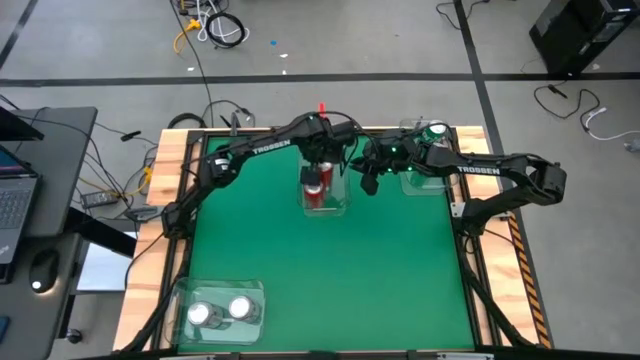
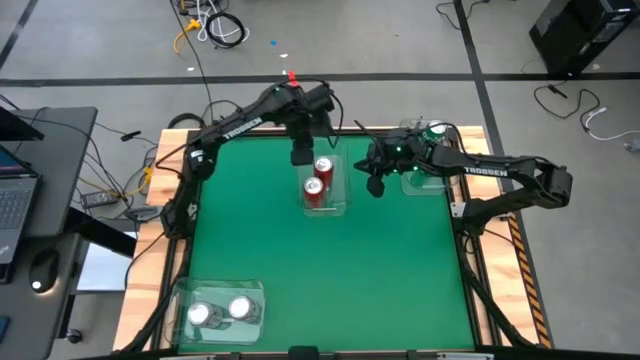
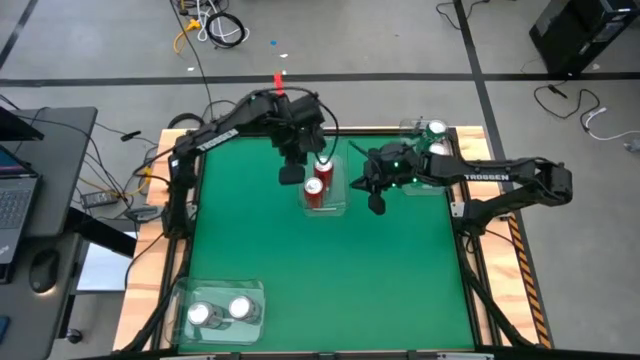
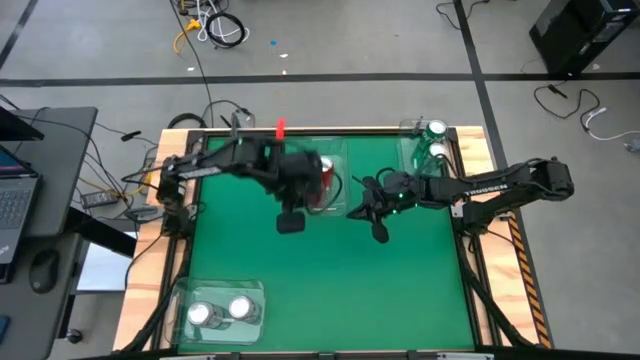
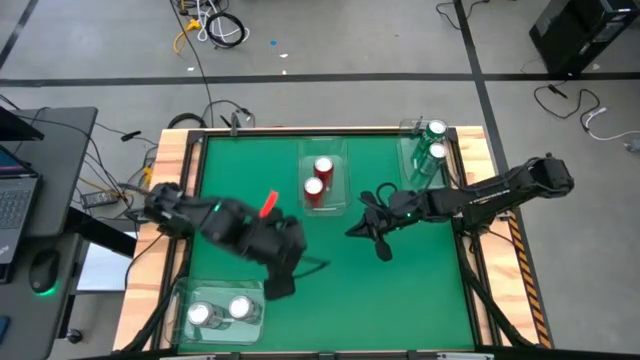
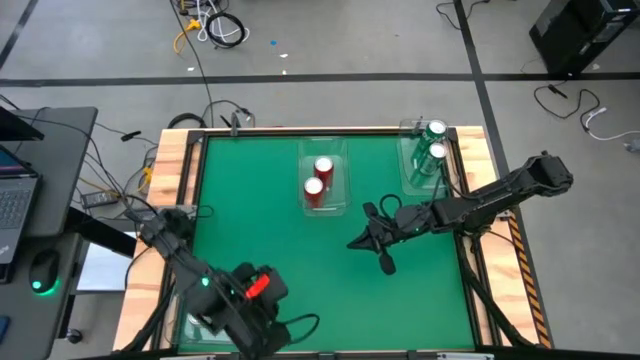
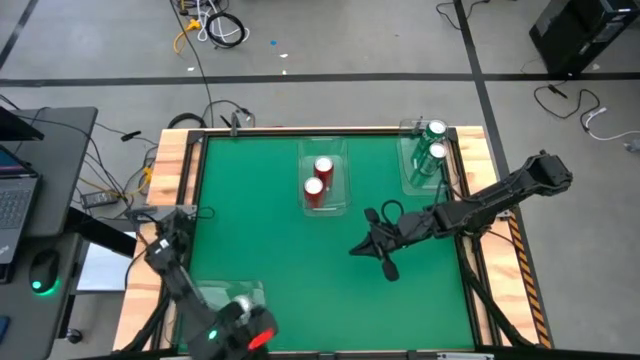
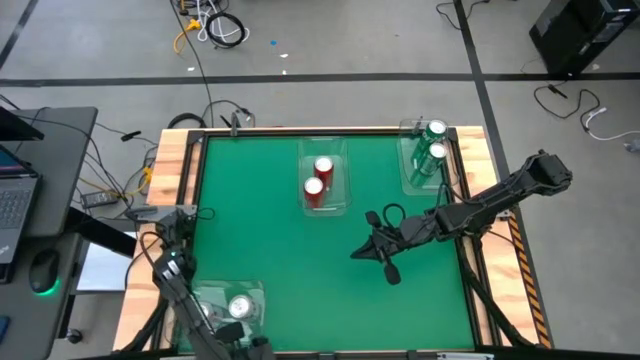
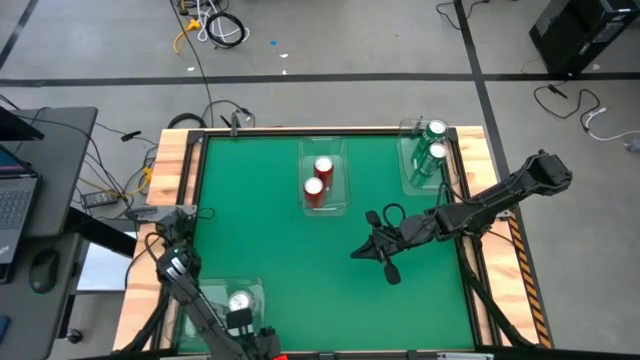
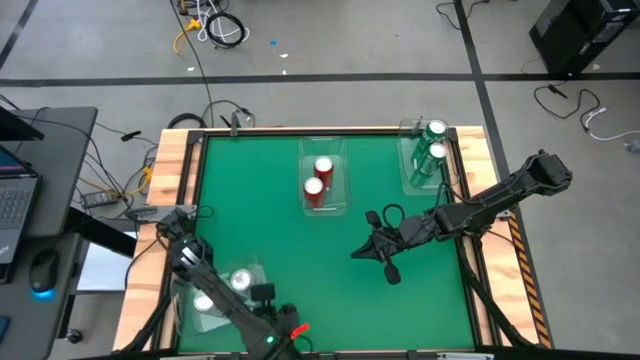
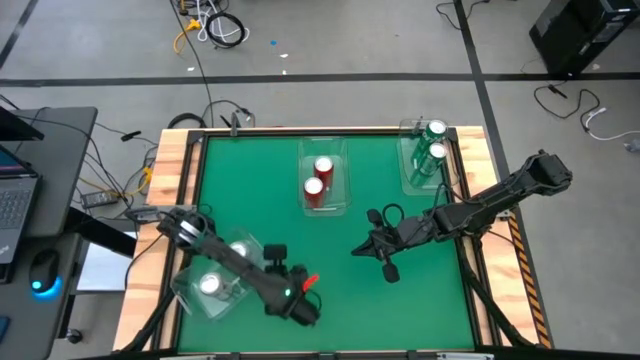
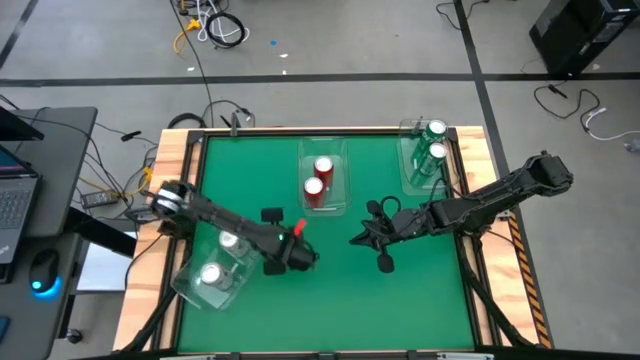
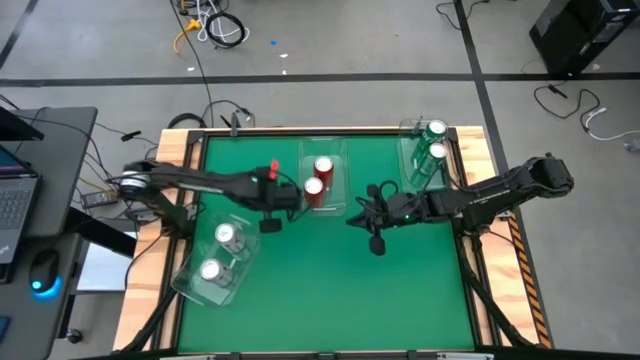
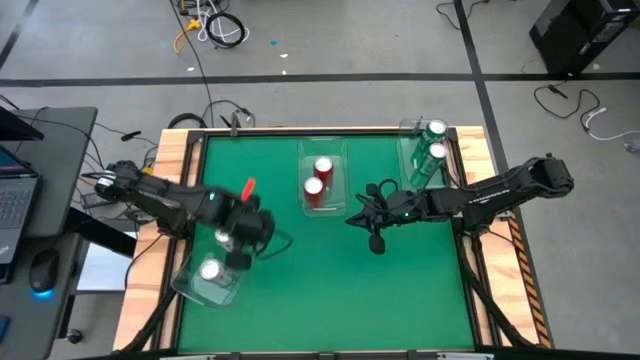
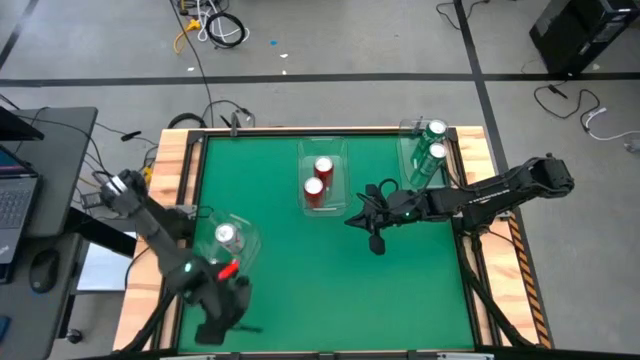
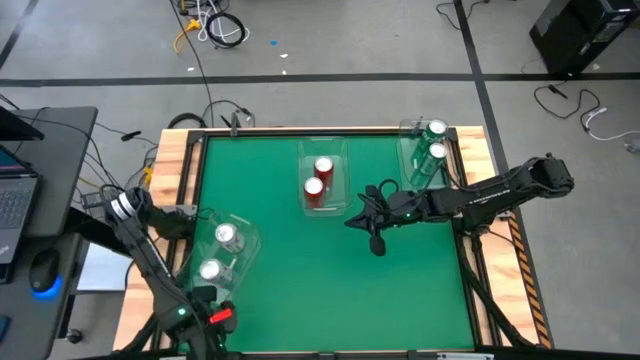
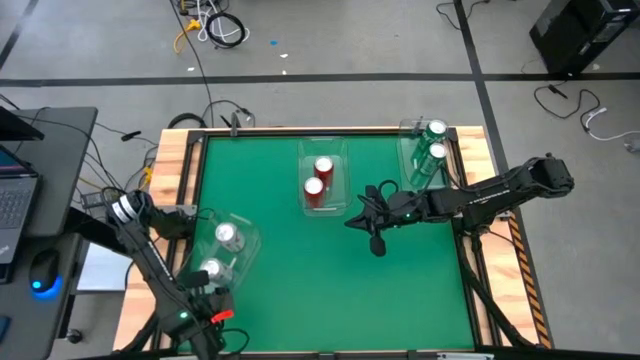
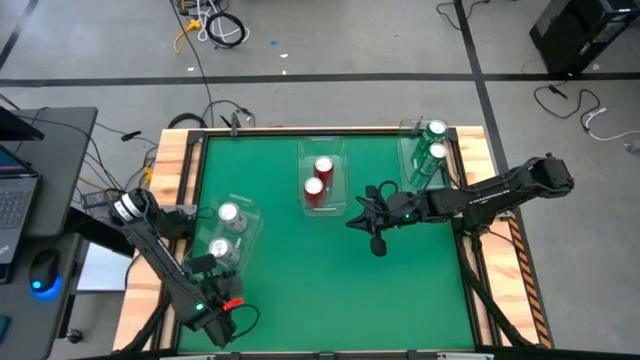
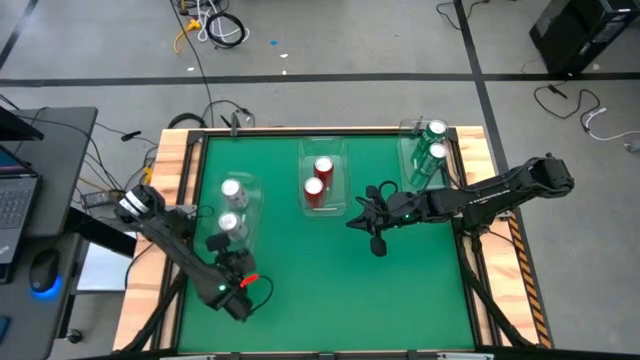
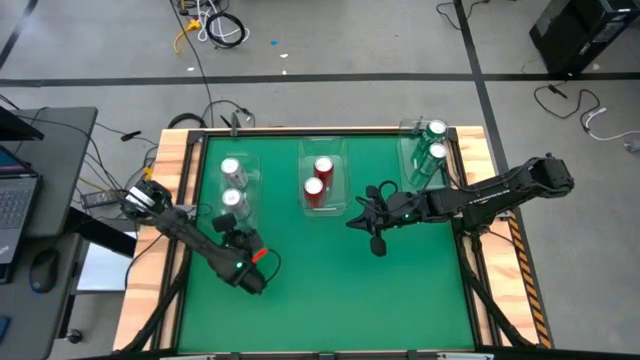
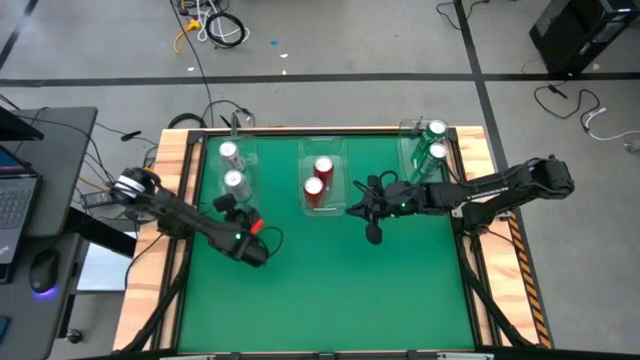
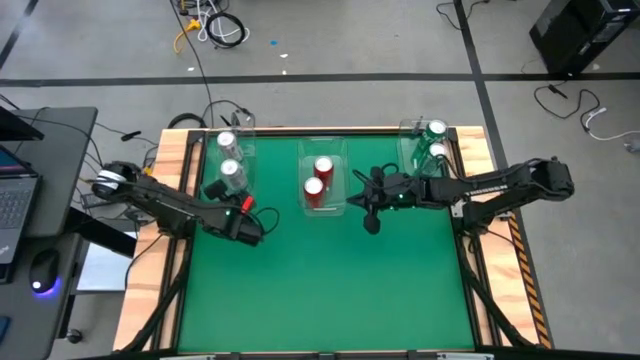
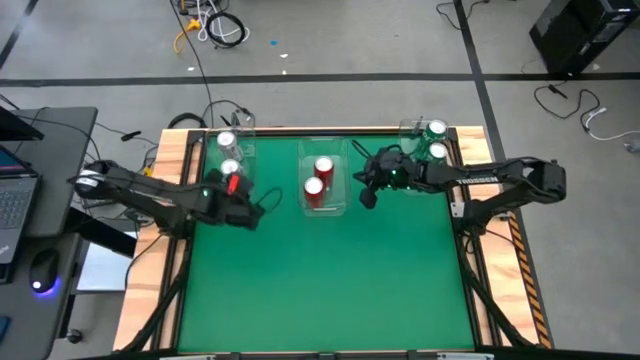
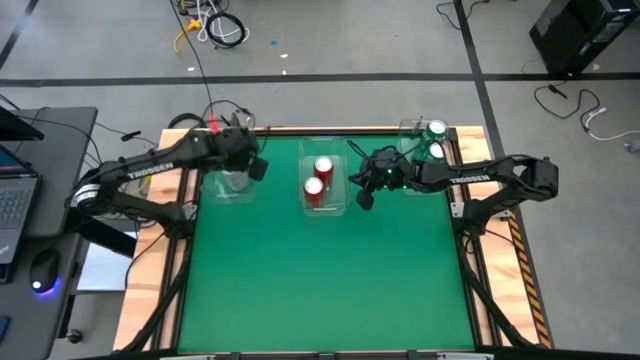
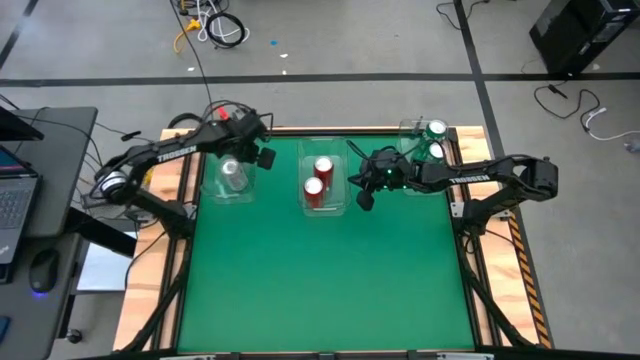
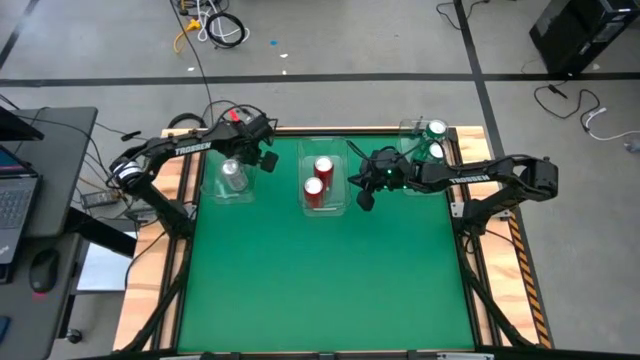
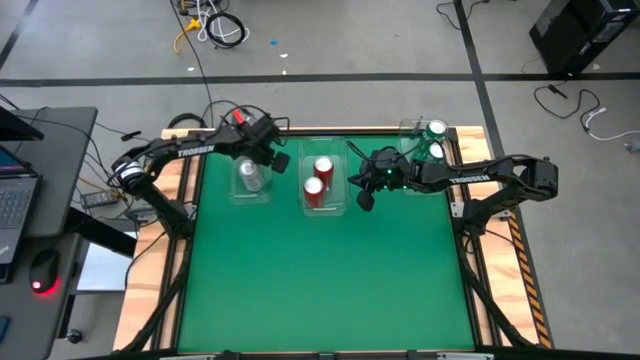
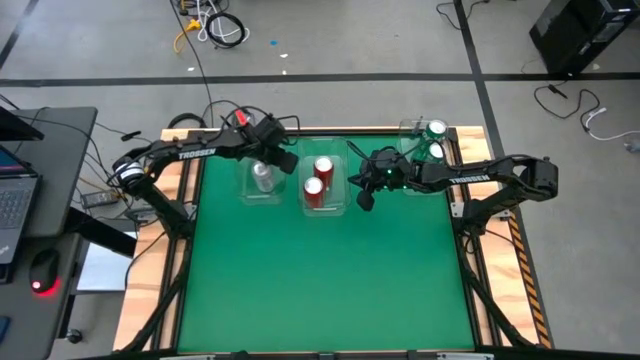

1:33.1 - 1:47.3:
Task: Sort soda cans
Move the bottom left transparent bin to the top left of the table

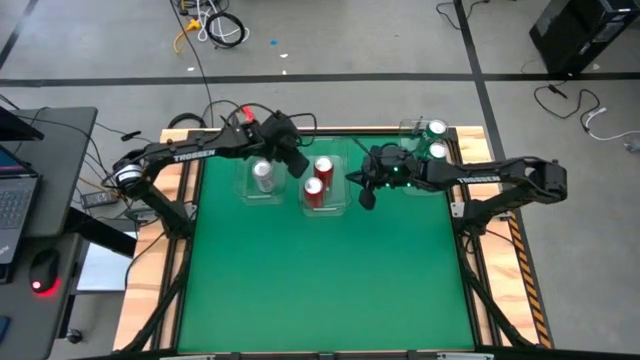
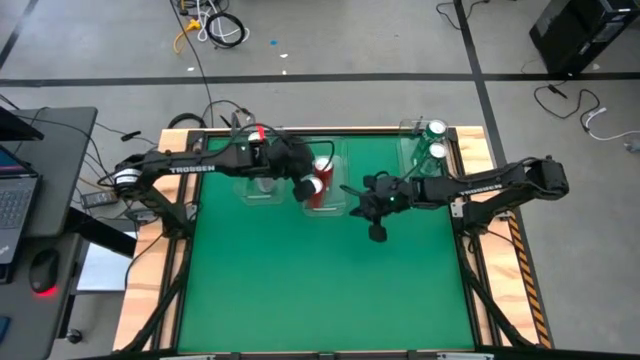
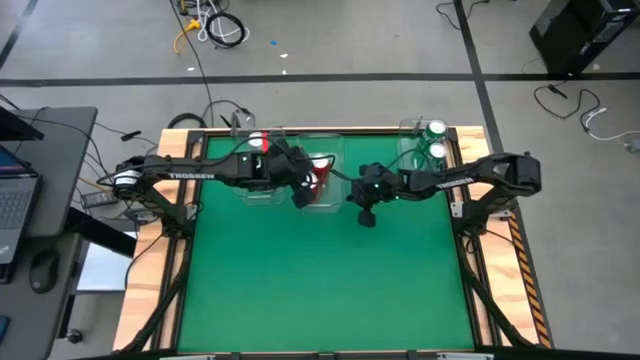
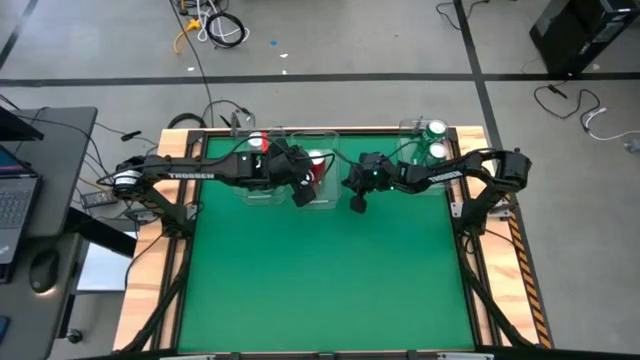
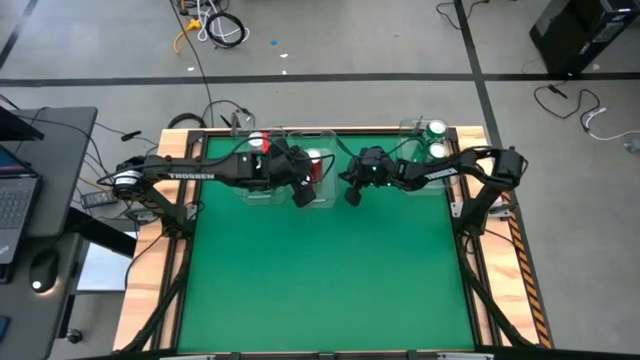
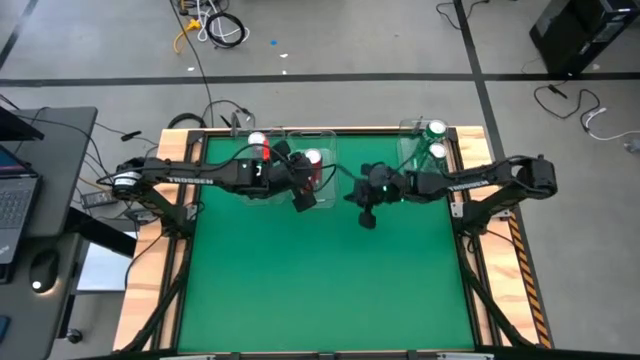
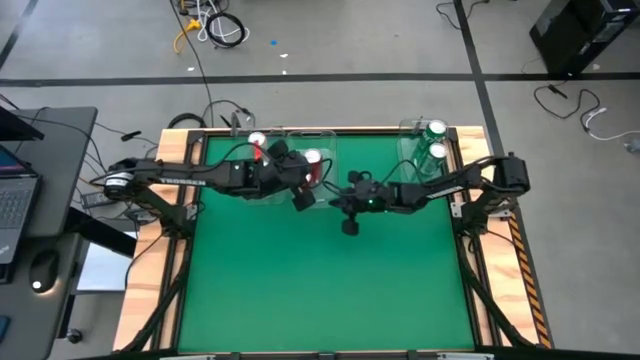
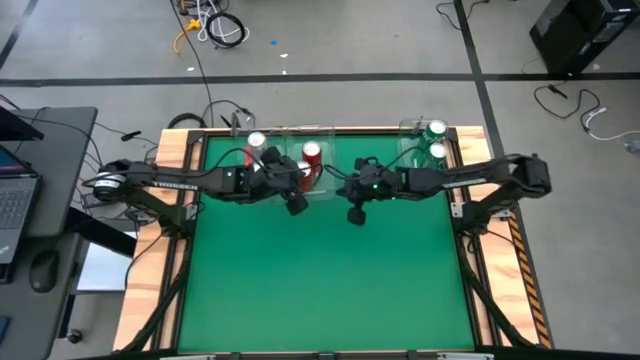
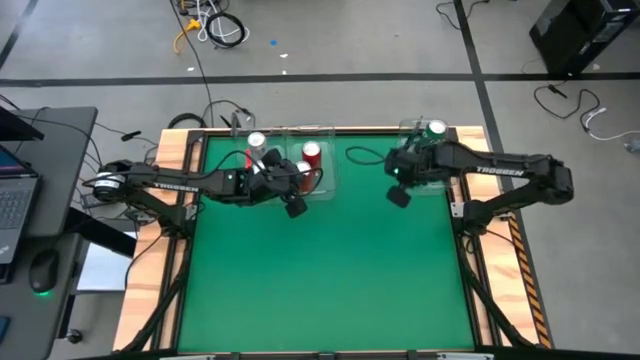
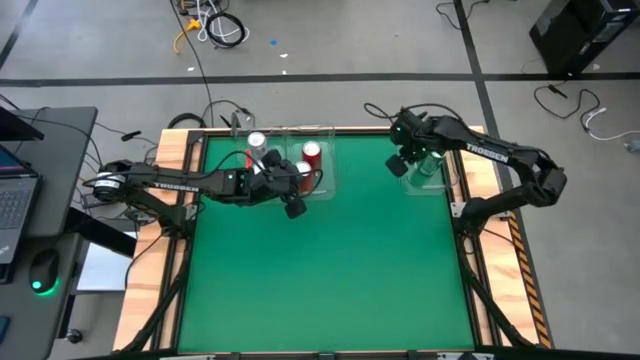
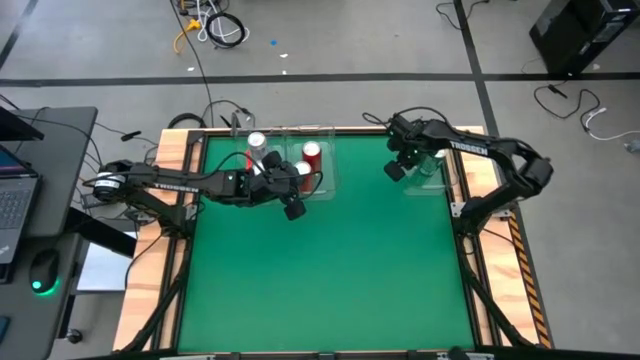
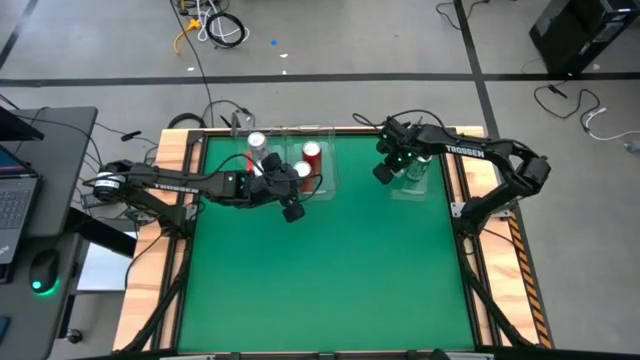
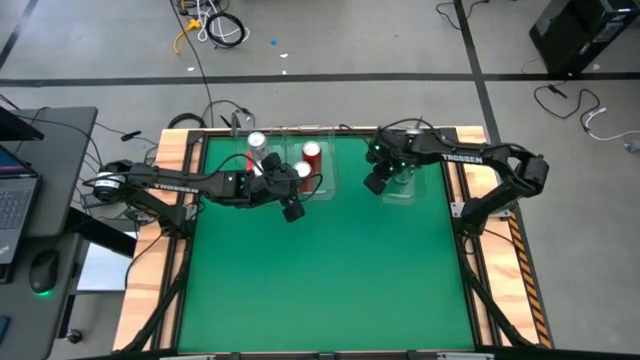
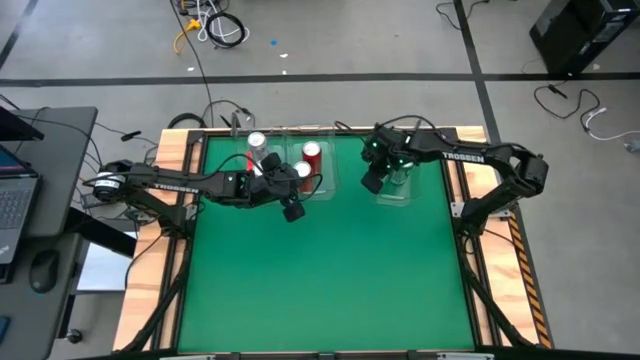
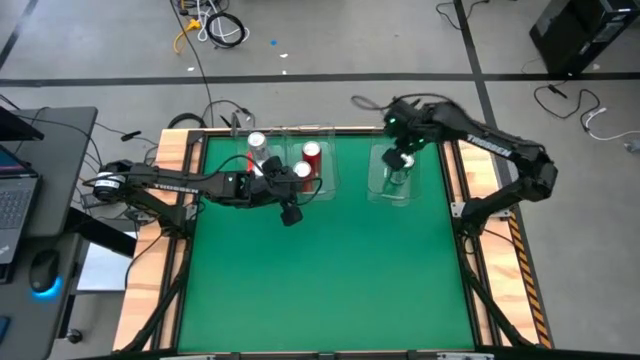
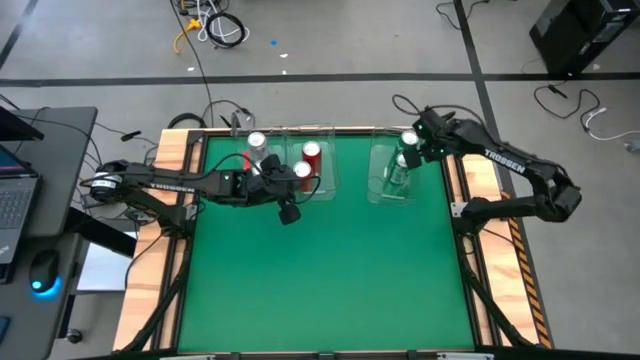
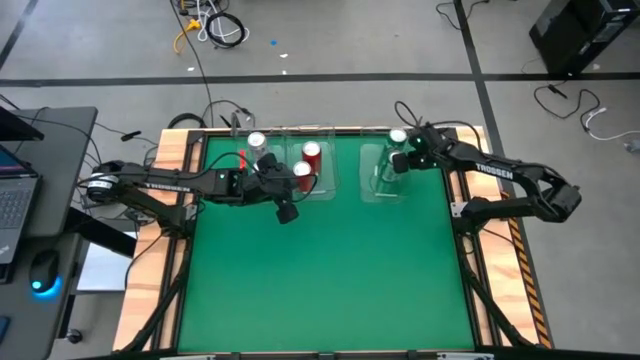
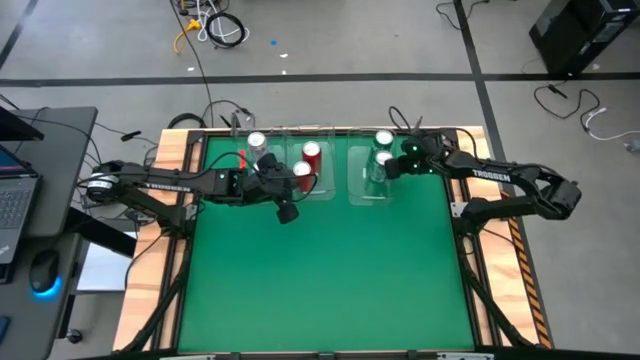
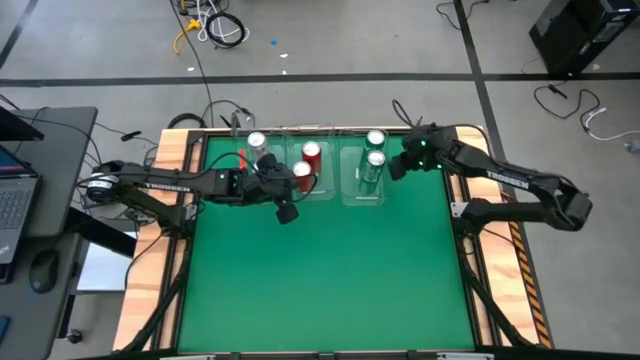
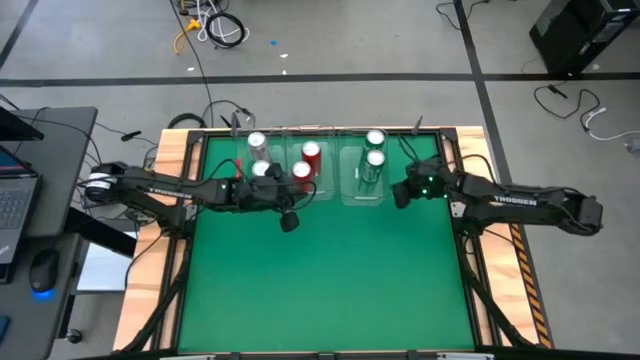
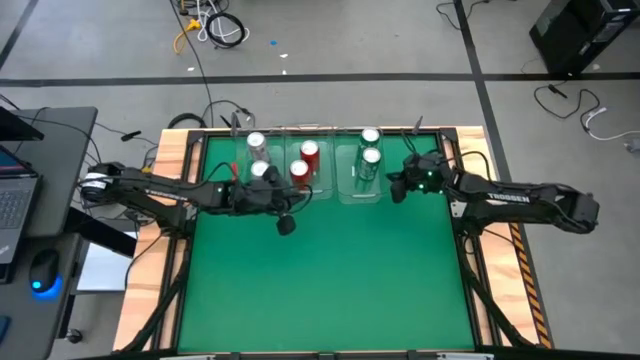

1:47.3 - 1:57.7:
Adjust the transparent bins
